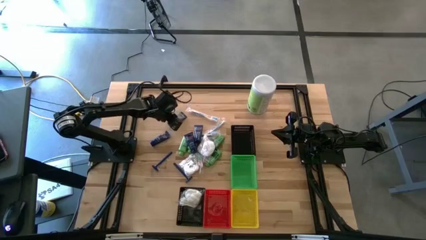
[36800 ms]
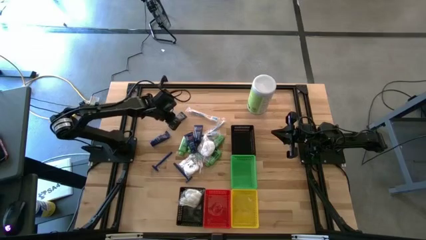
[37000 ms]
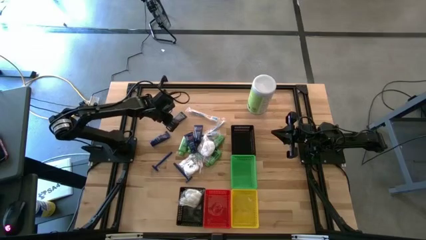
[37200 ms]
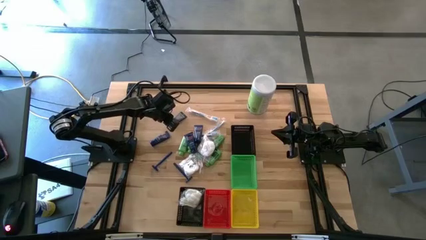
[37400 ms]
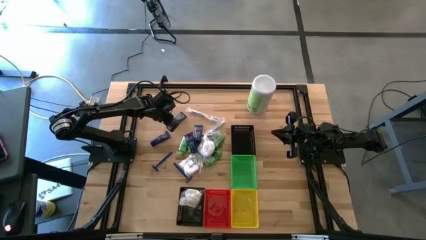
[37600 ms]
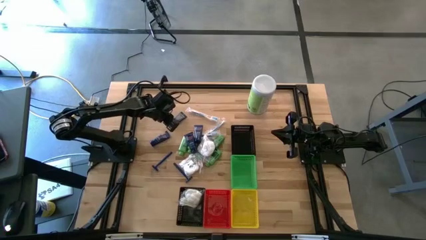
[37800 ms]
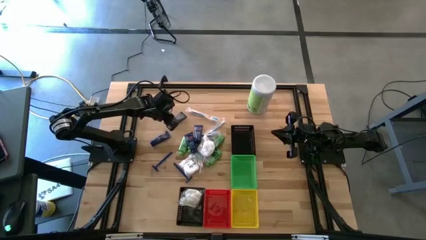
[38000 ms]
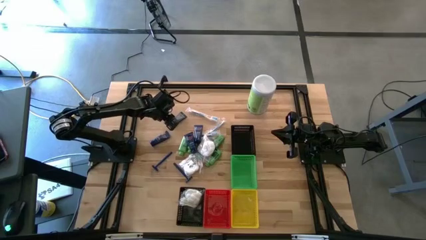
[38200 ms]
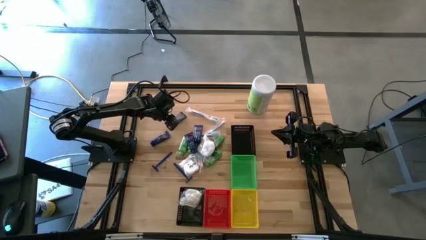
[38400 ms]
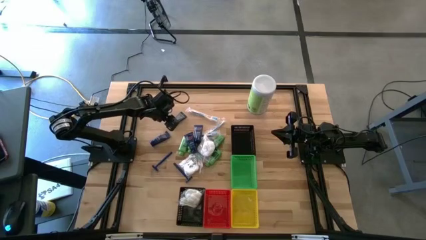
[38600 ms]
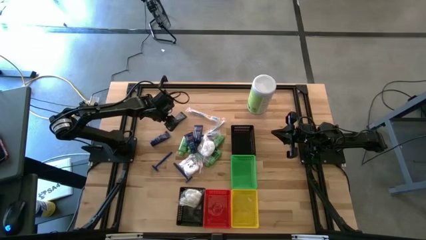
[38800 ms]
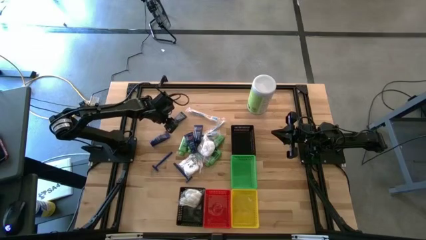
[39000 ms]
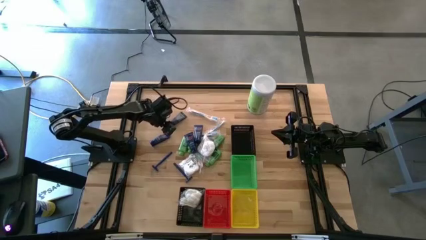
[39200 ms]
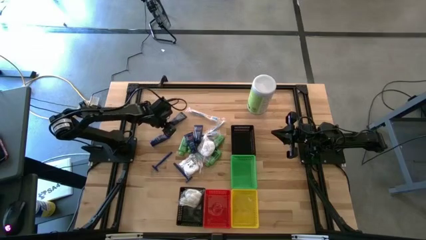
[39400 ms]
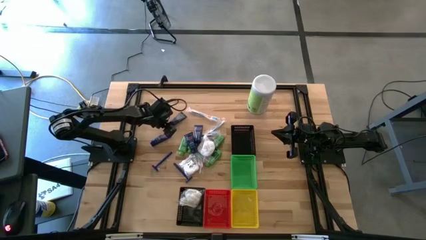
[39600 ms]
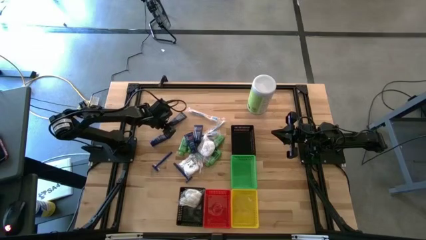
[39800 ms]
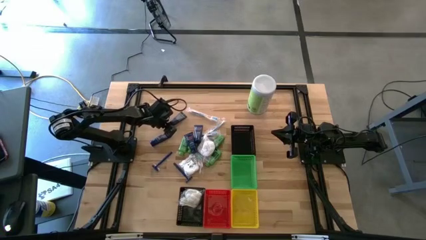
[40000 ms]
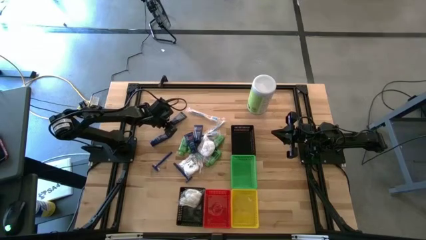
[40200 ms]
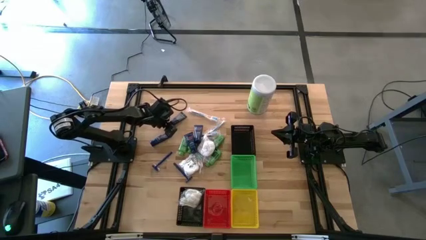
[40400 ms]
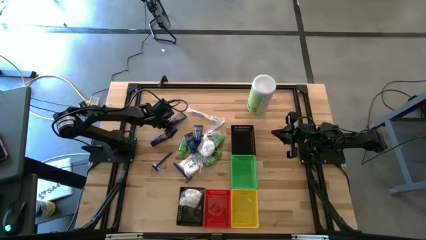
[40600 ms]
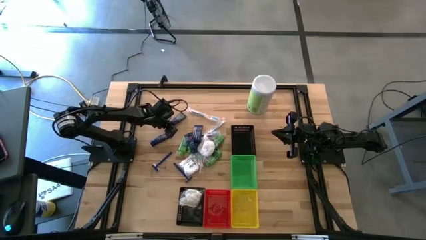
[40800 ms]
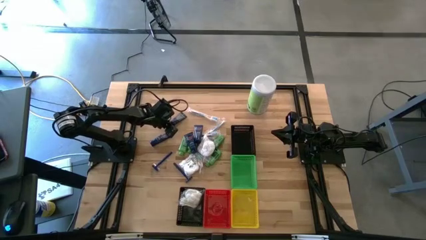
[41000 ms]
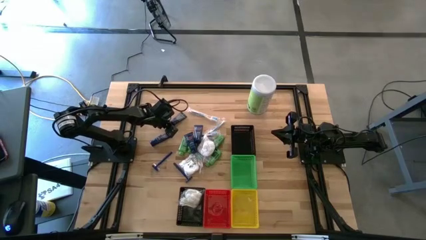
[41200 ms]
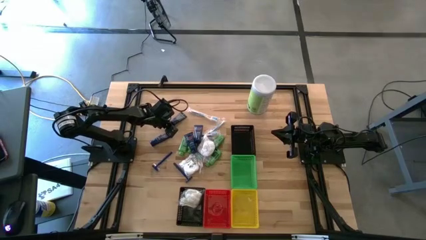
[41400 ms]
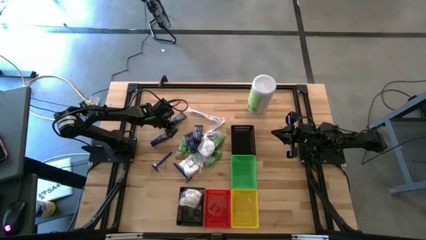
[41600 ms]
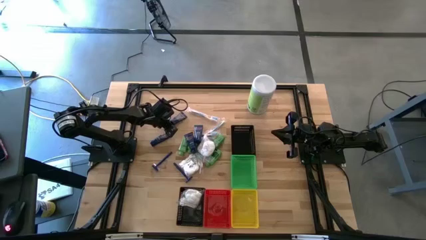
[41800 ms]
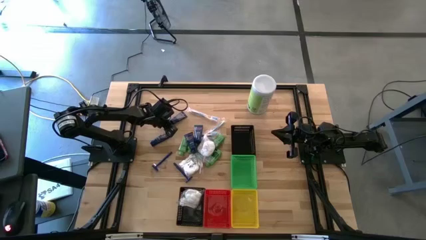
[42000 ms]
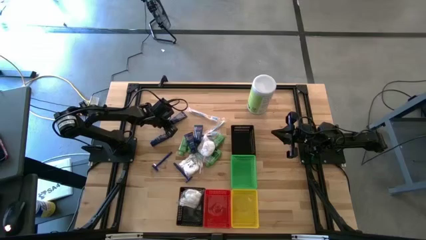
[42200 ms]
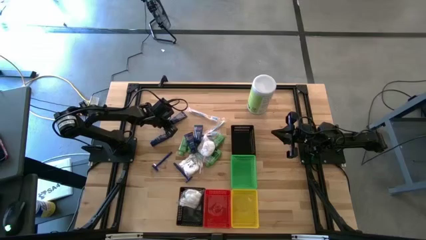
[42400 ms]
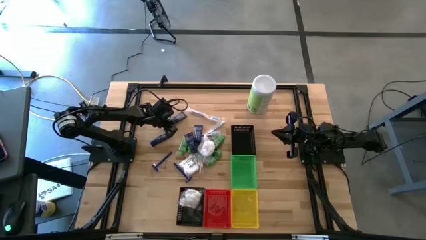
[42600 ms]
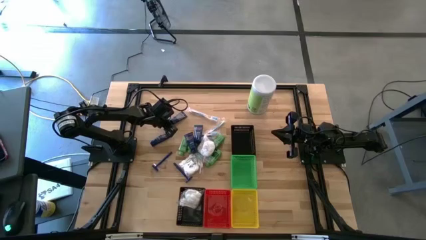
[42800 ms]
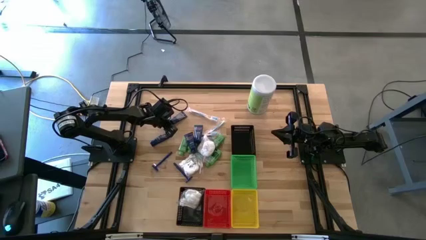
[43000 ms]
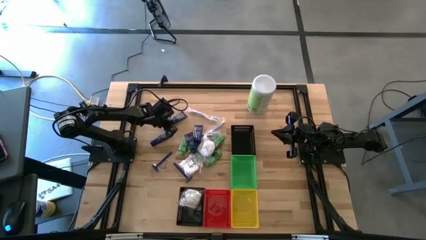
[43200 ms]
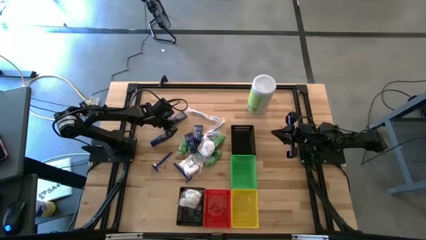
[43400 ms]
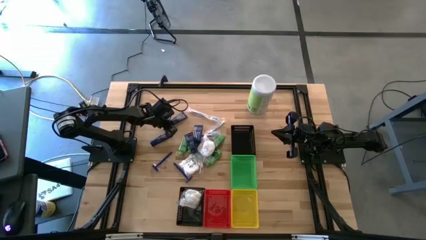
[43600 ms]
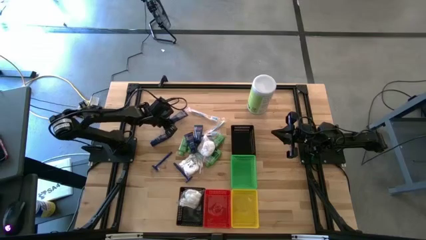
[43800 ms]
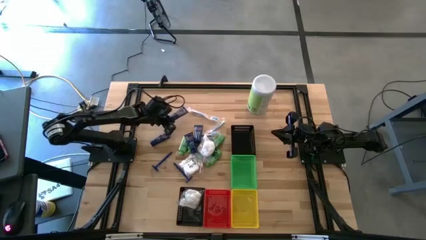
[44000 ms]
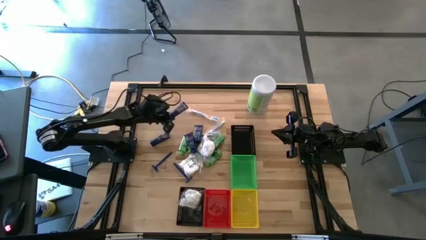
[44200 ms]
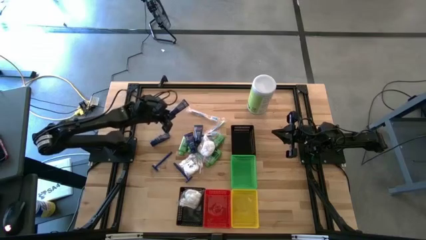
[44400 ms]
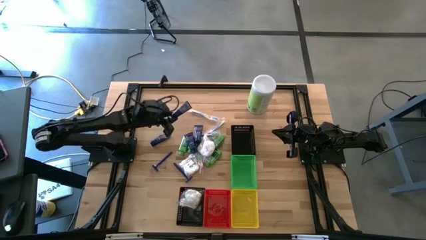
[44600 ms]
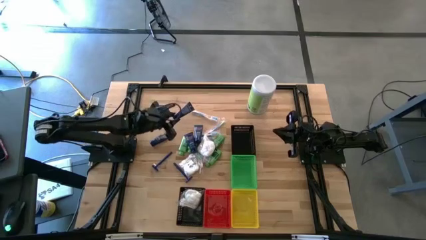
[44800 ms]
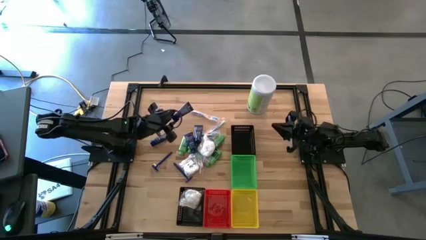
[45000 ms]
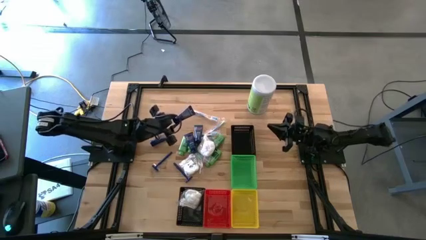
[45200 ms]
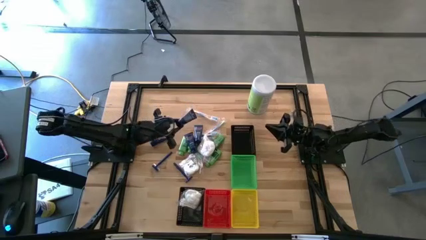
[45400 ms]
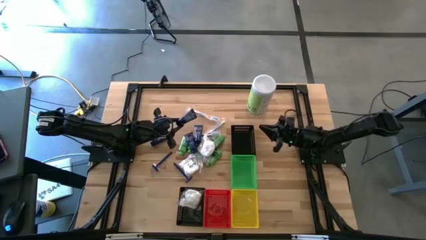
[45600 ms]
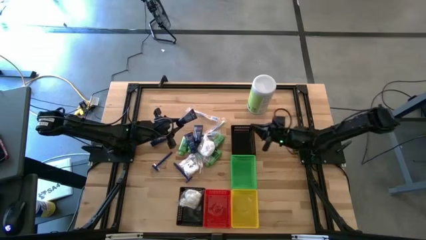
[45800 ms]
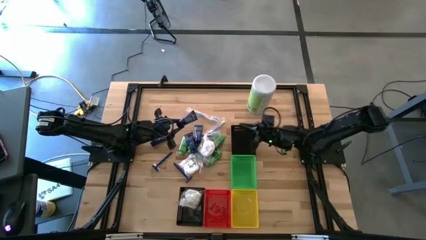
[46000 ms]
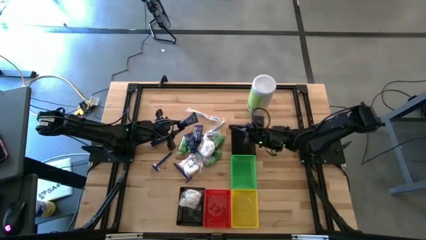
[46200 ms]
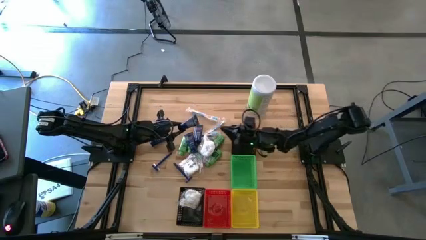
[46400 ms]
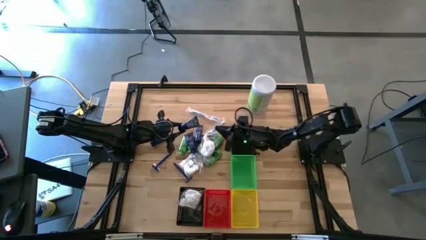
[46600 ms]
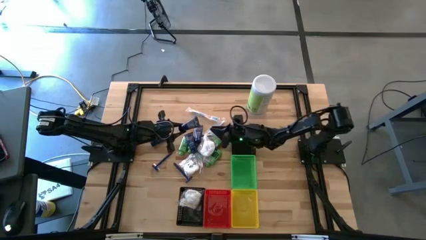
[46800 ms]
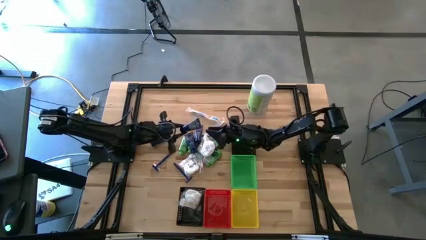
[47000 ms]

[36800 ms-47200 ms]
Task: Pick & Place Travel size toiletries
Put the blue shave cream into the red bin

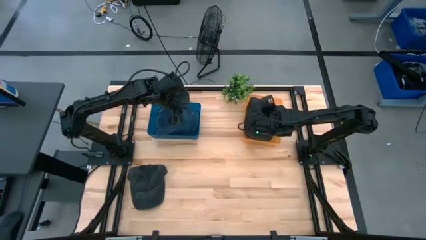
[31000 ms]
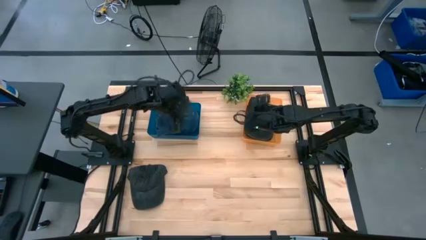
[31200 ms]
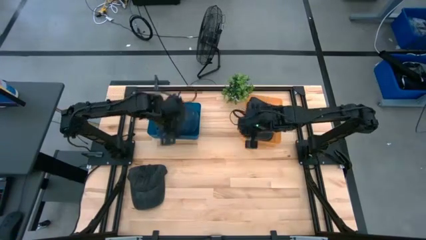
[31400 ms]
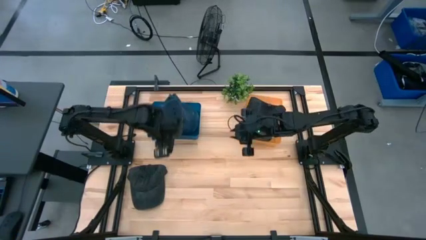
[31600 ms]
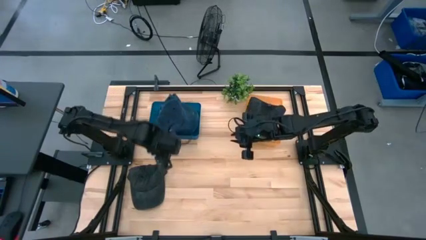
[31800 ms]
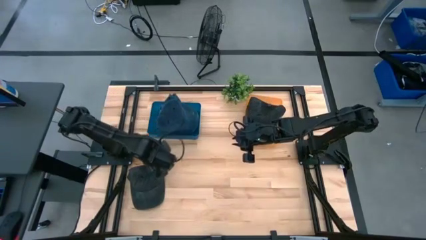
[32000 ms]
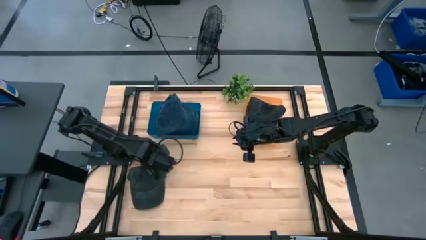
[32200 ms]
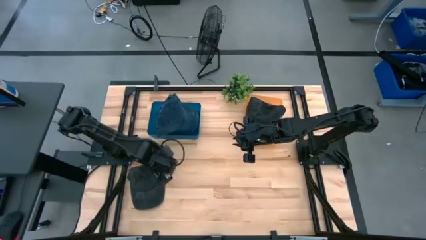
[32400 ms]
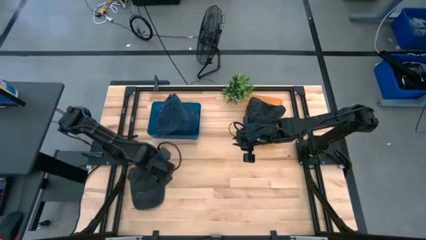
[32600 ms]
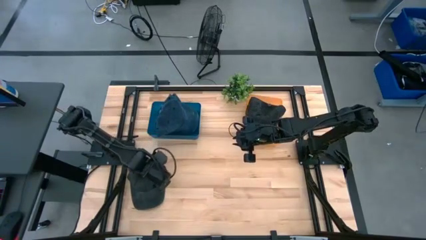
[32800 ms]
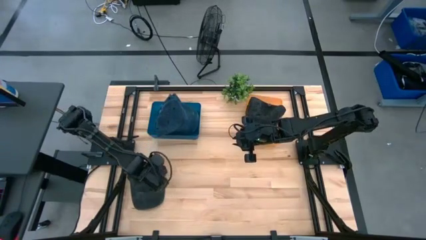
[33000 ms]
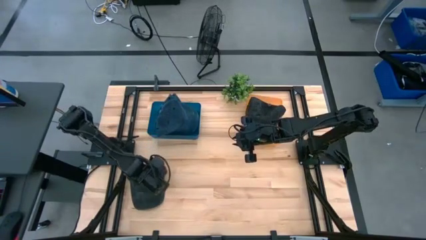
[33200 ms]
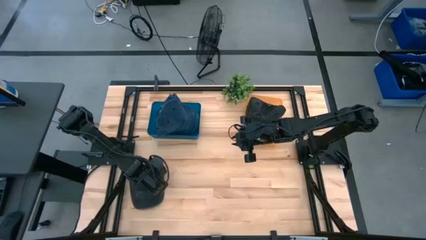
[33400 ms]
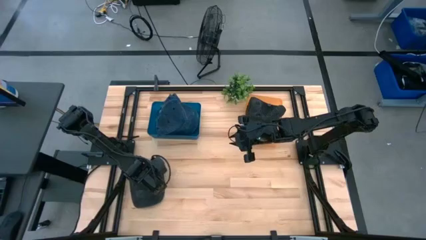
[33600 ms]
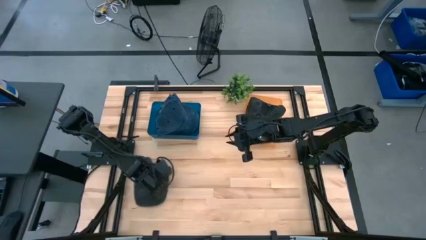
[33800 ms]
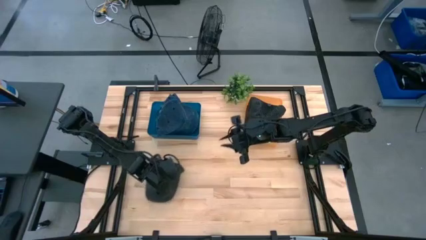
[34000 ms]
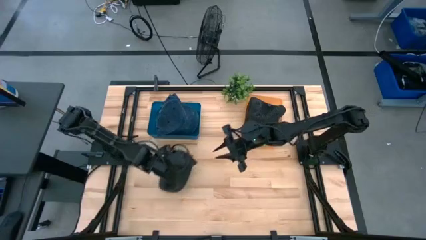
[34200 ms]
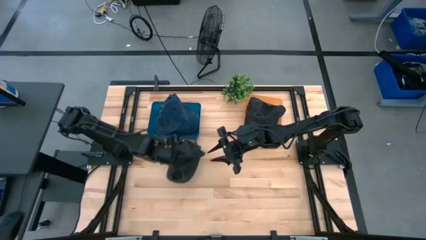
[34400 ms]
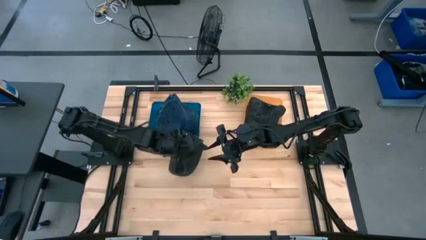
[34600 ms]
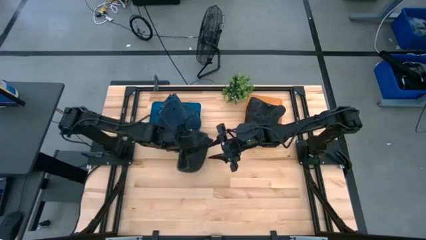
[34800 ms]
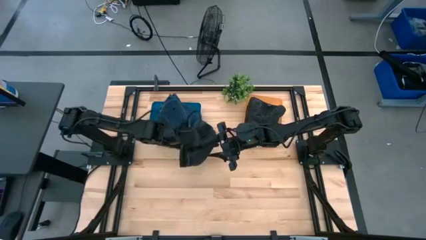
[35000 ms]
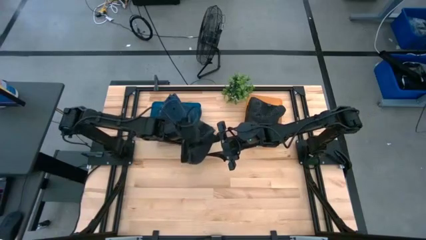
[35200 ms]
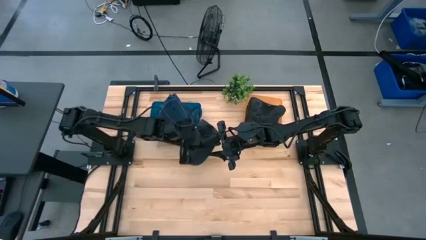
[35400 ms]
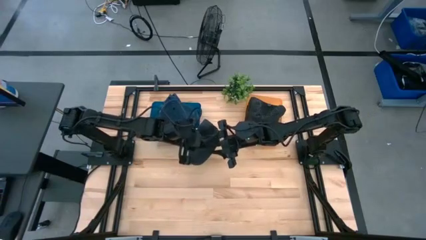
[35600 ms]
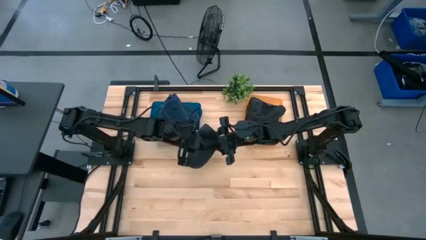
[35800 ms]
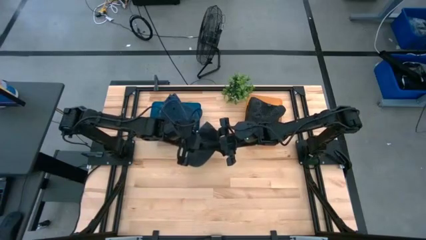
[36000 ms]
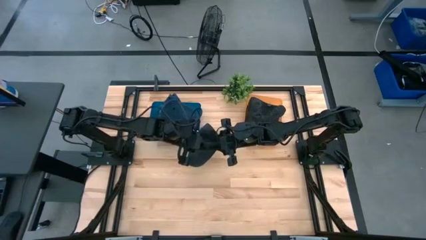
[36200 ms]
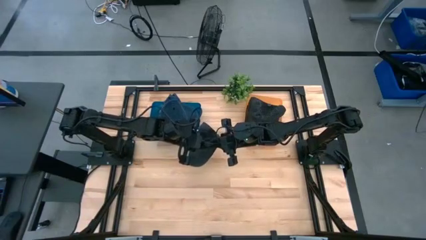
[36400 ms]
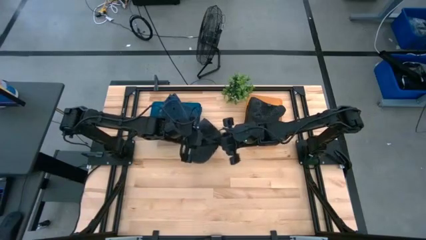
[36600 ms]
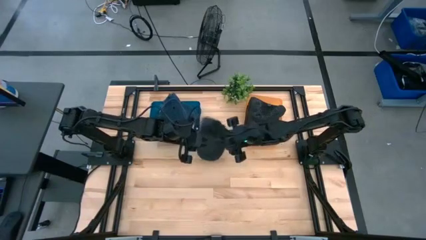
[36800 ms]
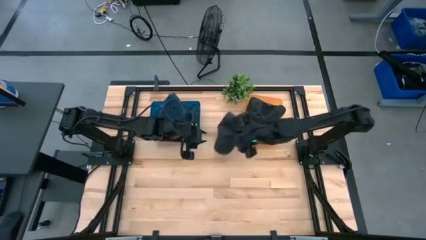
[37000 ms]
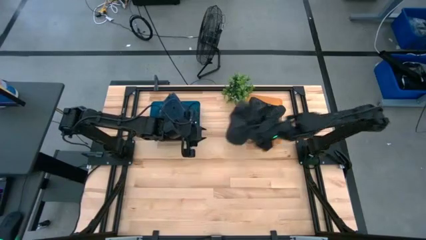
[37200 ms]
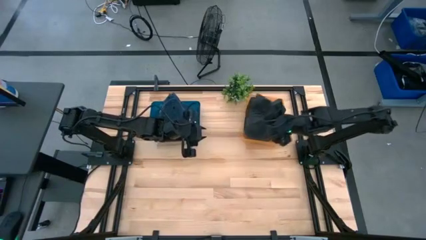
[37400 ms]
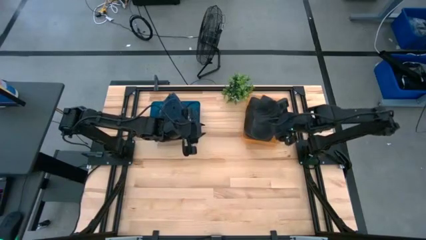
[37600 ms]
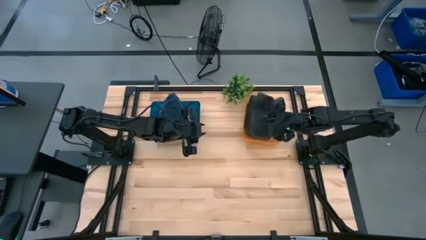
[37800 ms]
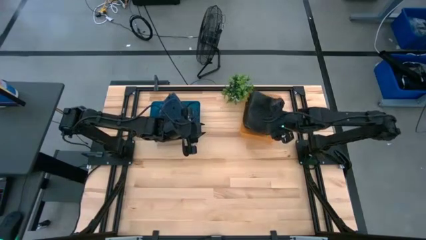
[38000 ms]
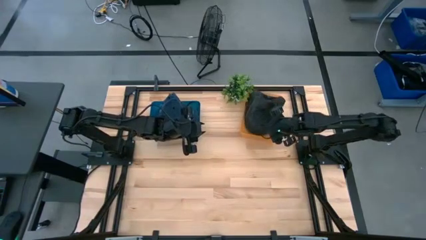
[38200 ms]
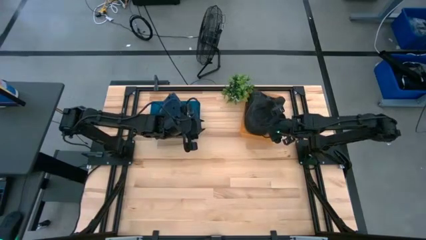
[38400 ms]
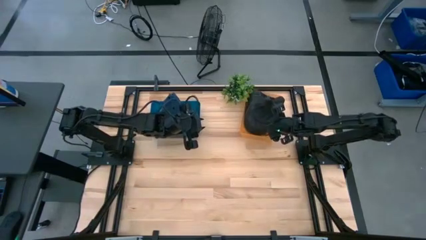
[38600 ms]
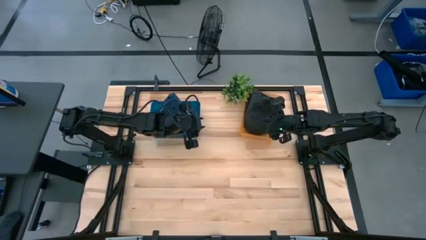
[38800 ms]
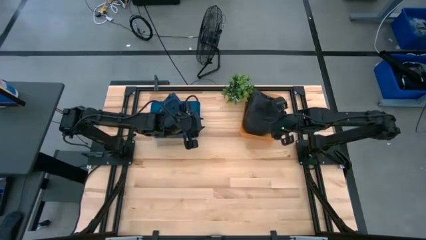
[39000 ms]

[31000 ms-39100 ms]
Task: Pick & Place hat
Put the black cap into the orange bin
